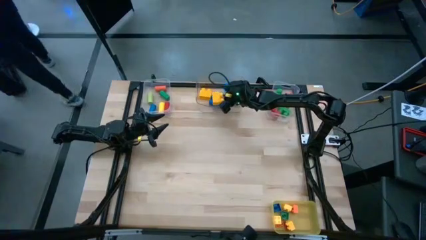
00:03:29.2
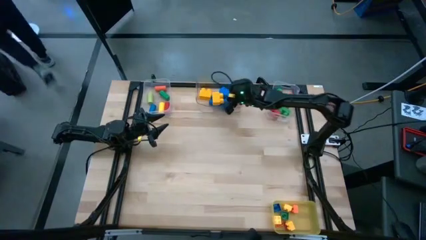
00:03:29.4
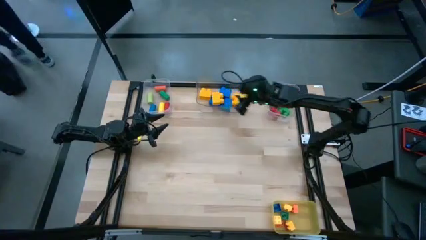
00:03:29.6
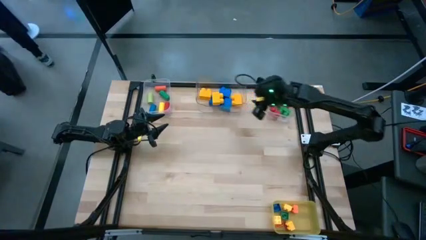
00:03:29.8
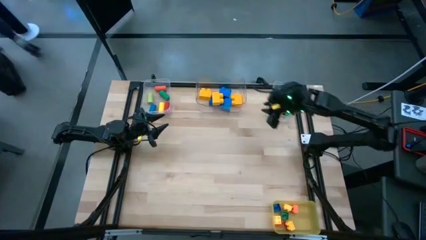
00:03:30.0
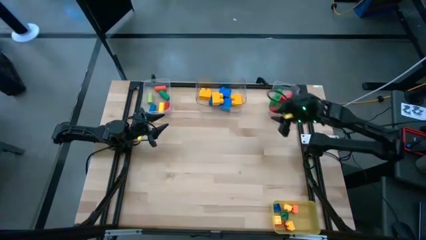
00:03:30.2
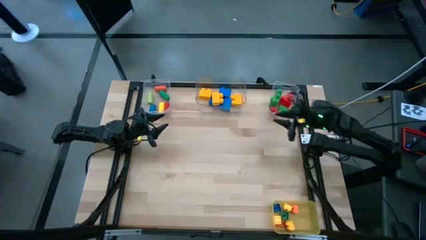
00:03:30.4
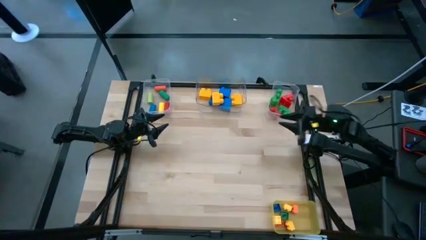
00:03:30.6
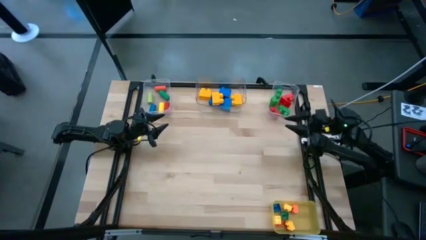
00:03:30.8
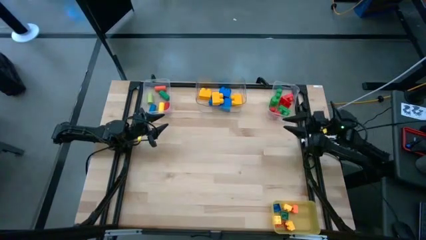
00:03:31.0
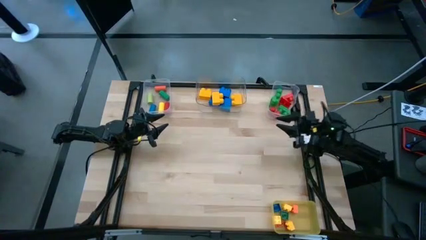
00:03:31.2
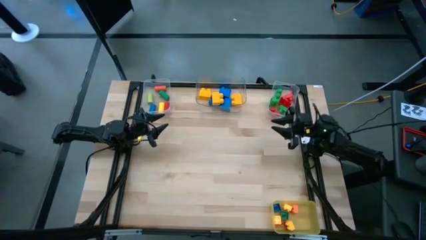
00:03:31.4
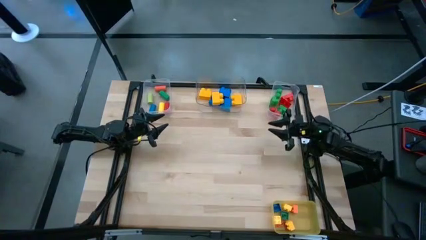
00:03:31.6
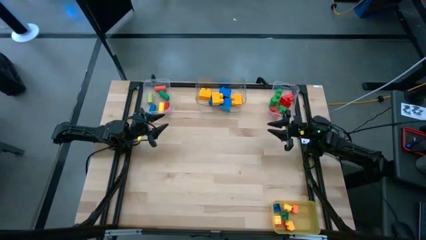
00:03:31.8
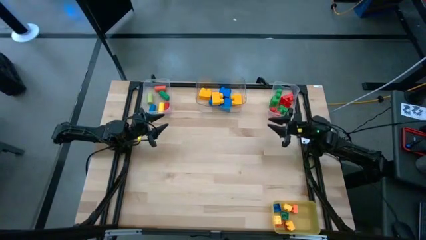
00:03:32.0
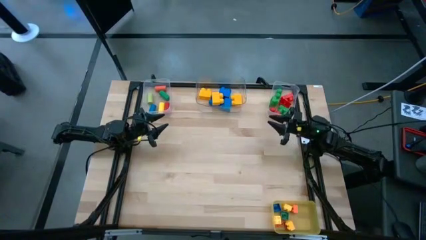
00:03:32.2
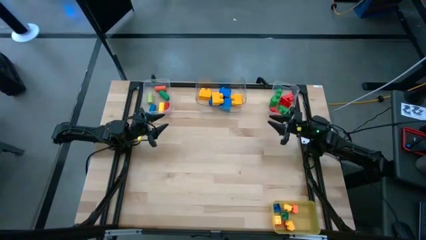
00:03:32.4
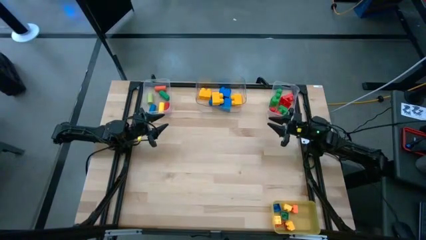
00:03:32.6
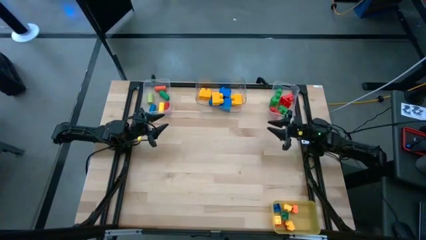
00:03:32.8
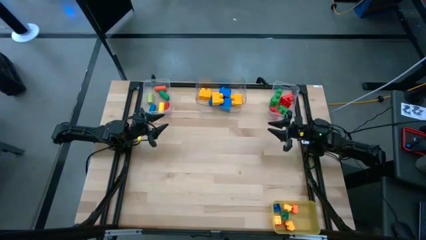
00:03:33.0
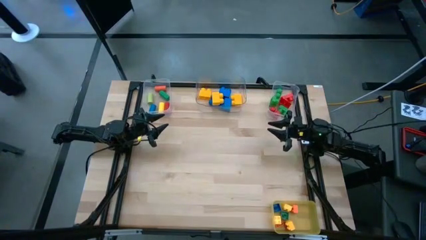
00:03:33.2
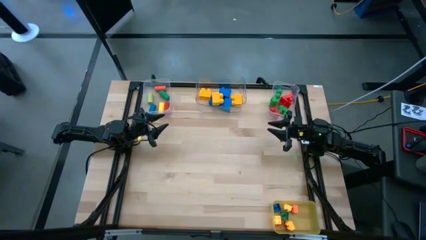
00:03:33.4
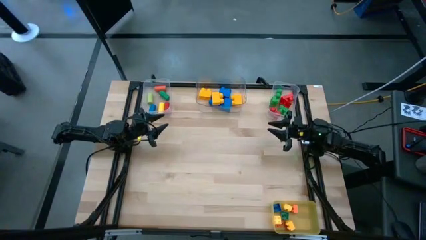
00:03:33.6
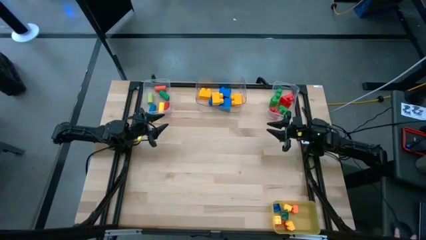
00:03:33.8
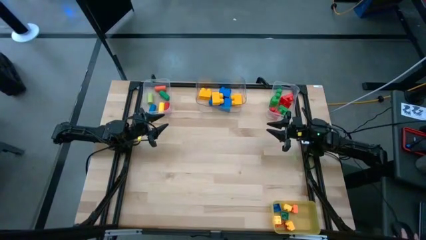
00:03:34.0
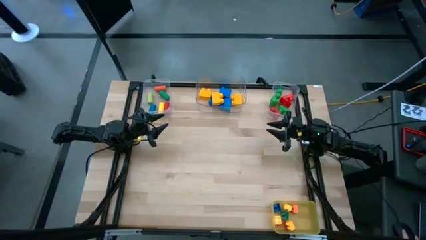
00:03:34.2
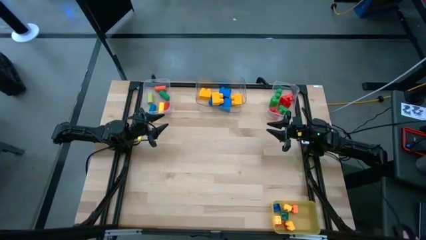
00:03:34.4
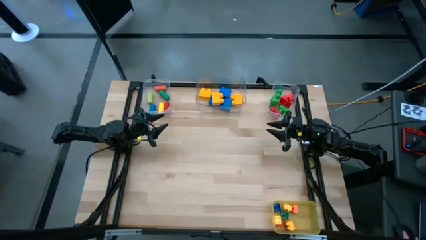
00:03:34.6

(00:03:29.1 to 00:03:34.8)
Task: Sort blocks by size
Return to Home Position

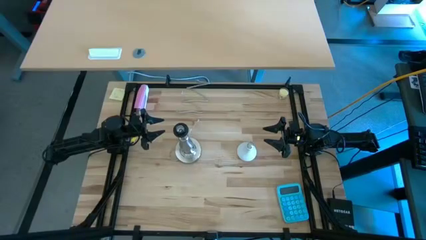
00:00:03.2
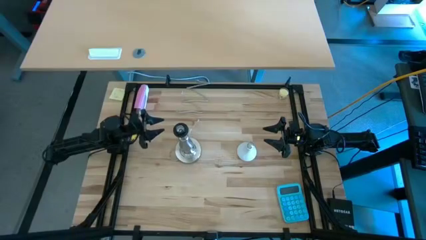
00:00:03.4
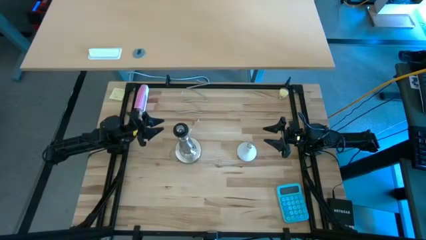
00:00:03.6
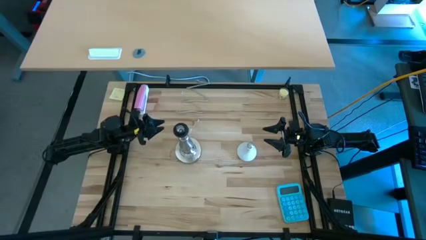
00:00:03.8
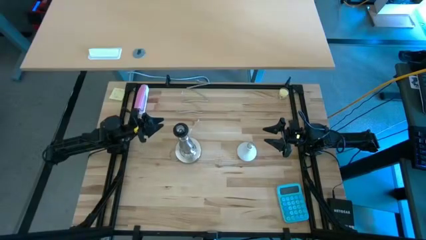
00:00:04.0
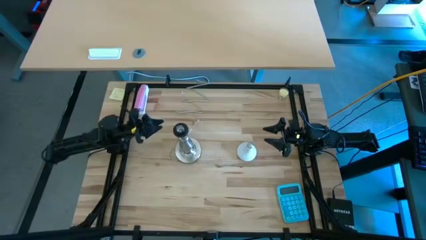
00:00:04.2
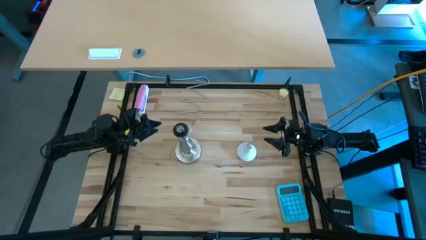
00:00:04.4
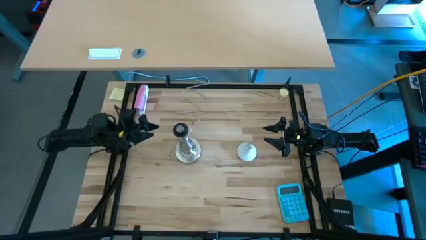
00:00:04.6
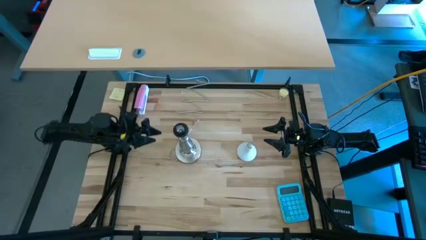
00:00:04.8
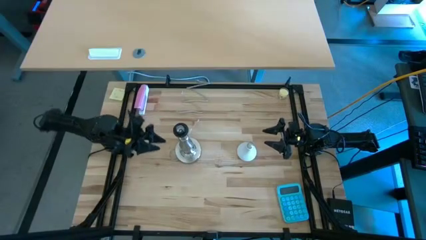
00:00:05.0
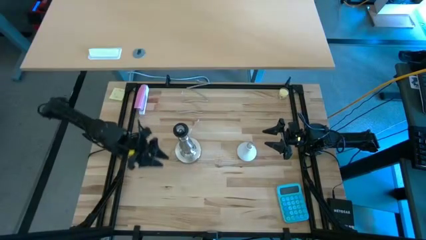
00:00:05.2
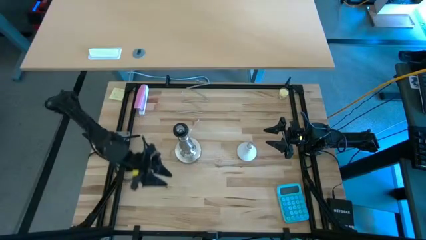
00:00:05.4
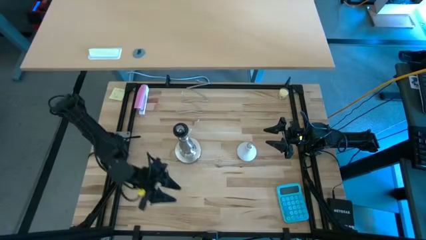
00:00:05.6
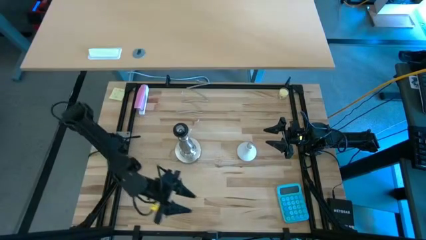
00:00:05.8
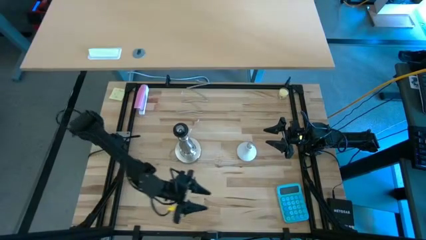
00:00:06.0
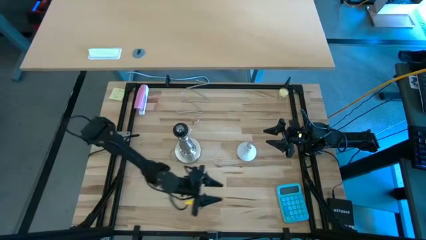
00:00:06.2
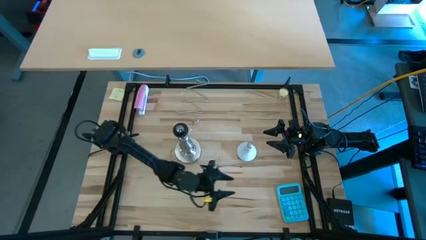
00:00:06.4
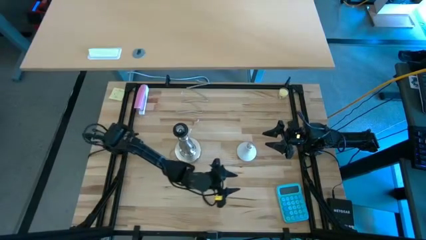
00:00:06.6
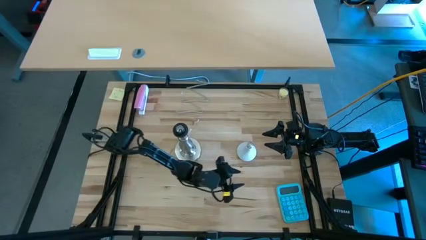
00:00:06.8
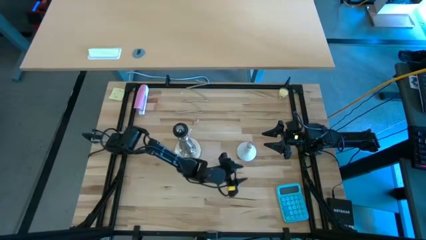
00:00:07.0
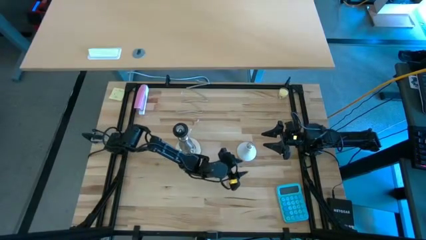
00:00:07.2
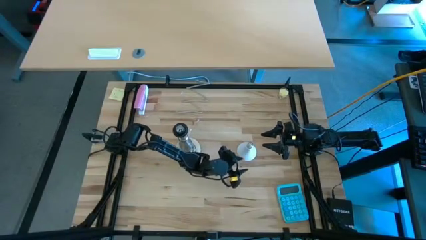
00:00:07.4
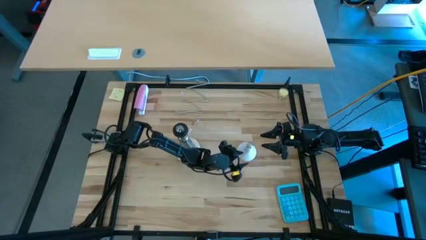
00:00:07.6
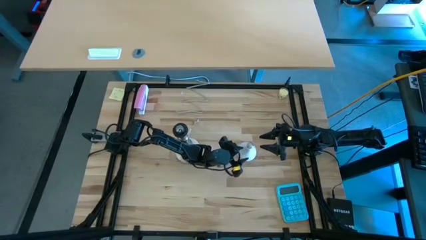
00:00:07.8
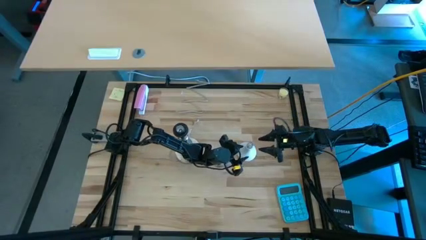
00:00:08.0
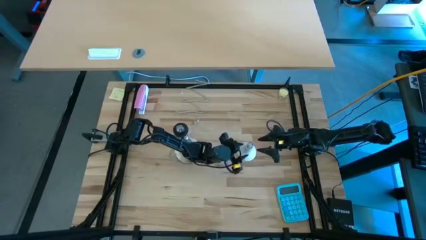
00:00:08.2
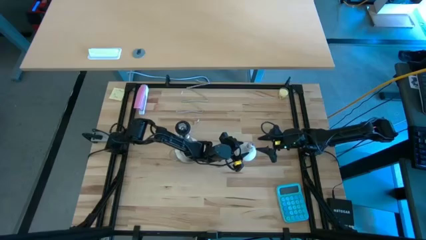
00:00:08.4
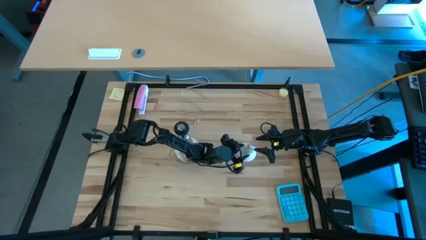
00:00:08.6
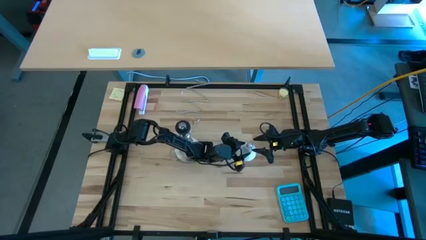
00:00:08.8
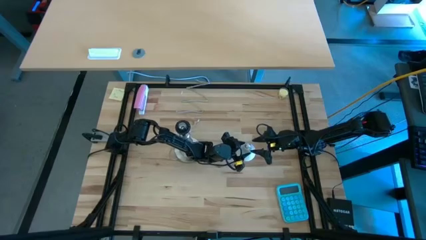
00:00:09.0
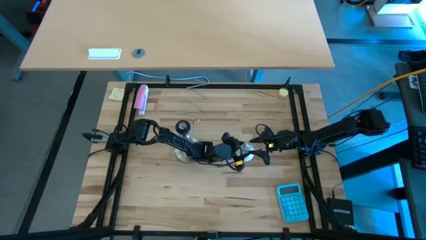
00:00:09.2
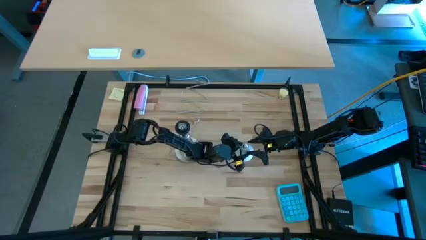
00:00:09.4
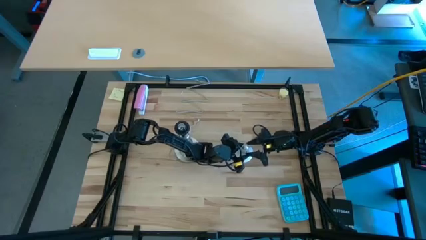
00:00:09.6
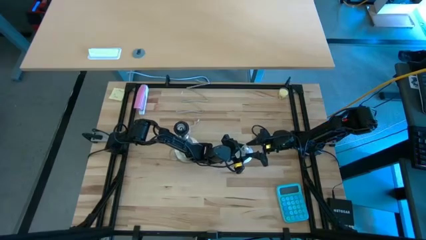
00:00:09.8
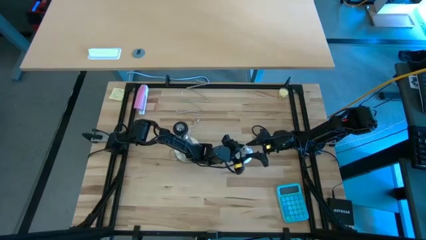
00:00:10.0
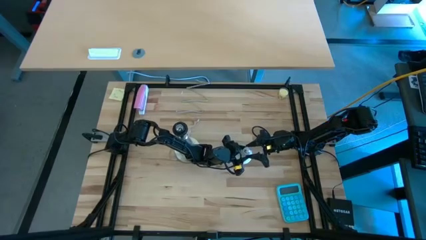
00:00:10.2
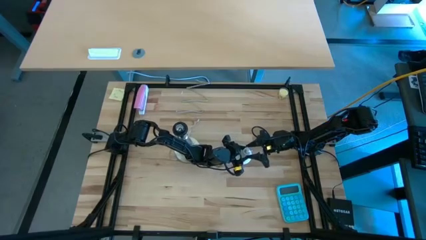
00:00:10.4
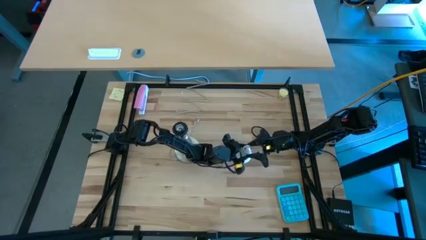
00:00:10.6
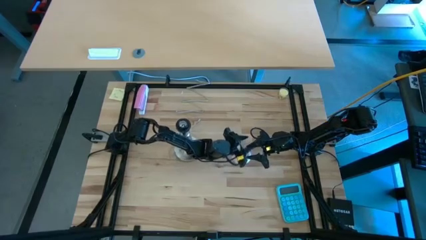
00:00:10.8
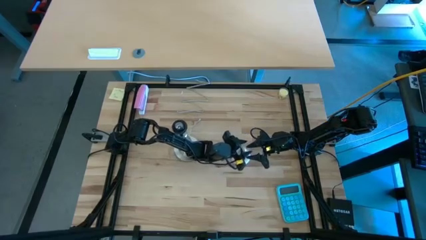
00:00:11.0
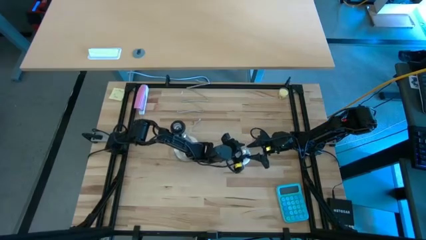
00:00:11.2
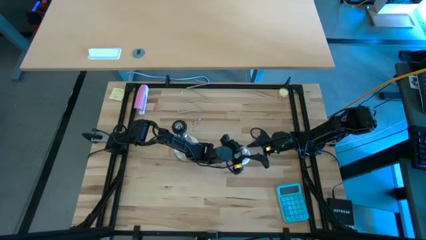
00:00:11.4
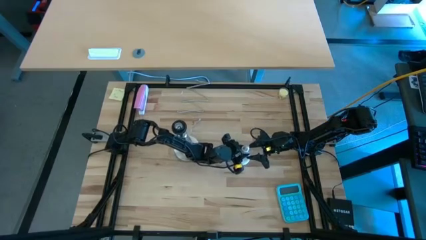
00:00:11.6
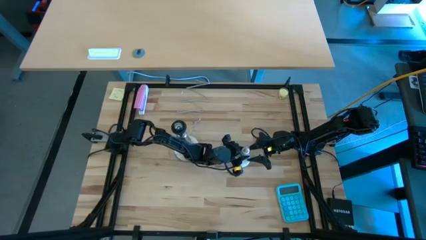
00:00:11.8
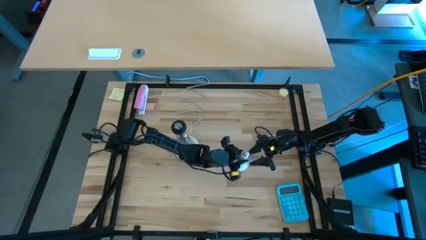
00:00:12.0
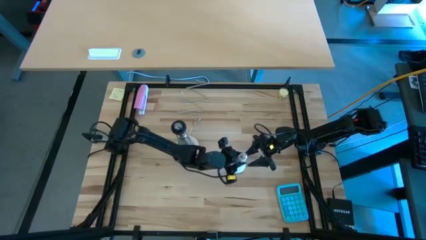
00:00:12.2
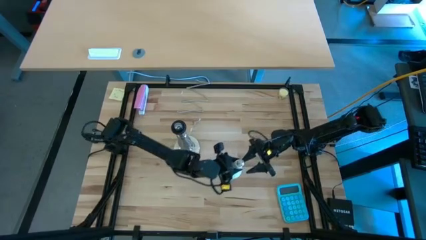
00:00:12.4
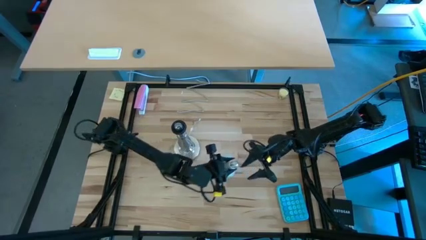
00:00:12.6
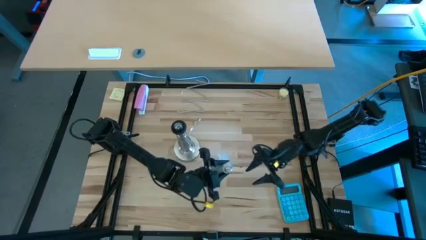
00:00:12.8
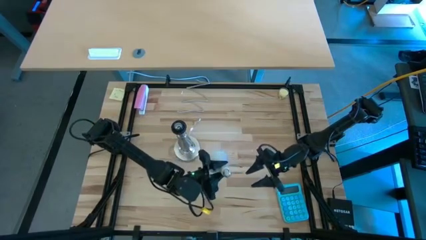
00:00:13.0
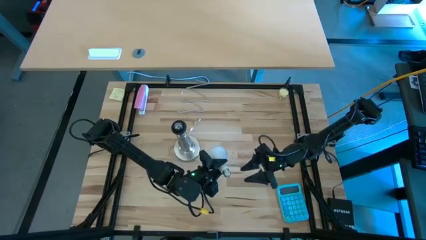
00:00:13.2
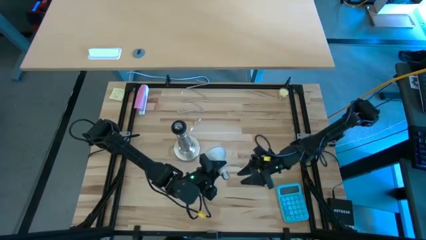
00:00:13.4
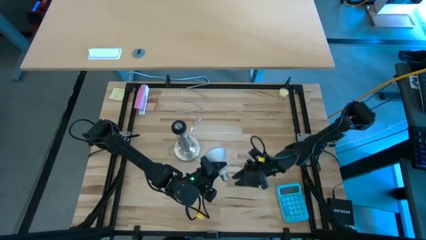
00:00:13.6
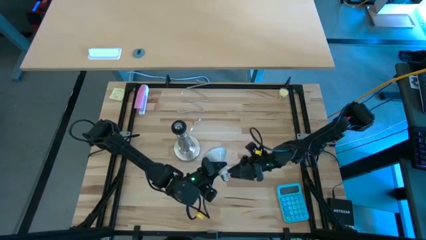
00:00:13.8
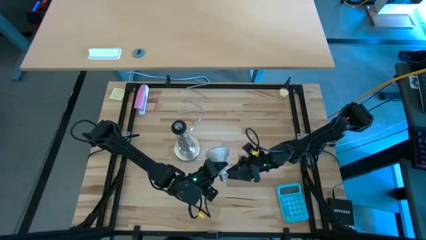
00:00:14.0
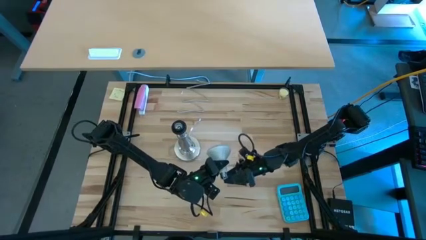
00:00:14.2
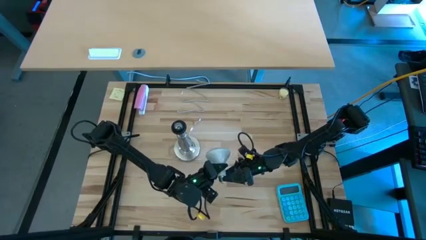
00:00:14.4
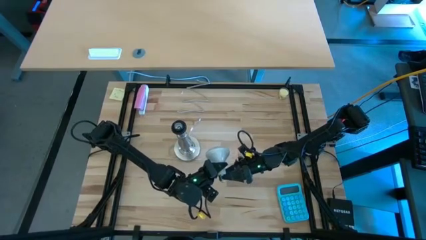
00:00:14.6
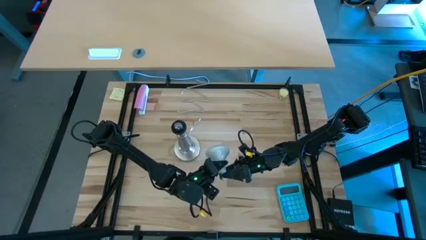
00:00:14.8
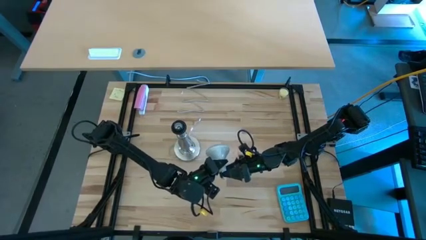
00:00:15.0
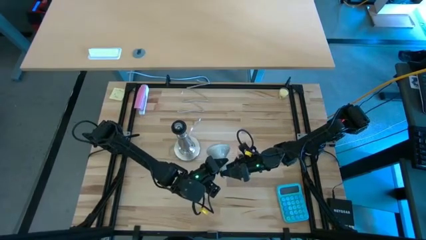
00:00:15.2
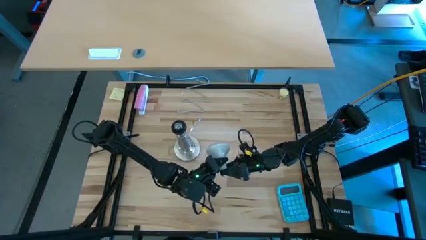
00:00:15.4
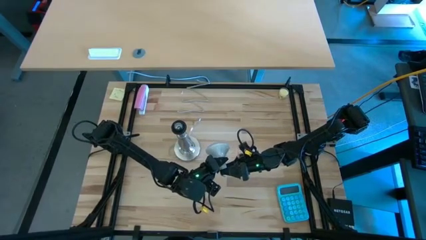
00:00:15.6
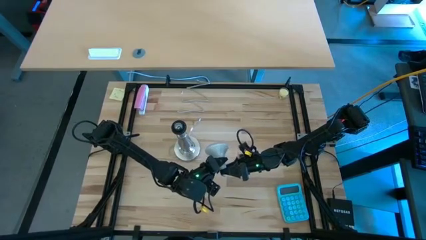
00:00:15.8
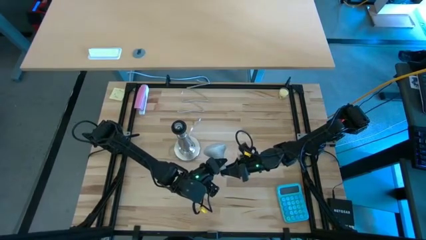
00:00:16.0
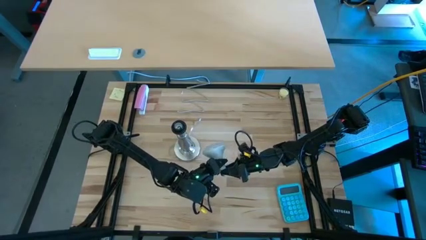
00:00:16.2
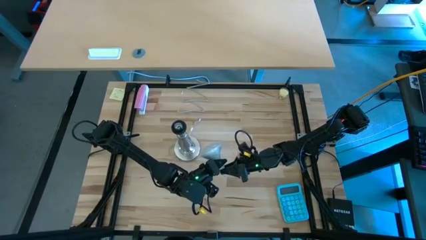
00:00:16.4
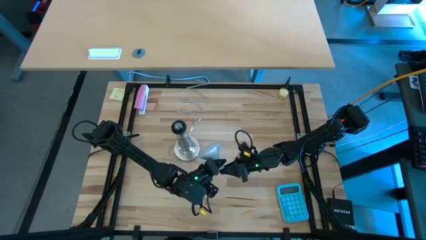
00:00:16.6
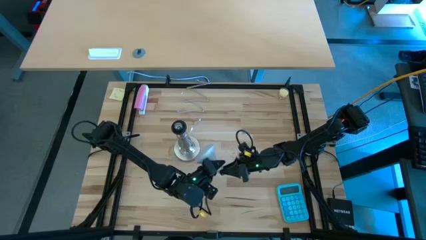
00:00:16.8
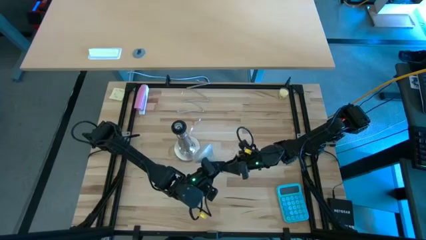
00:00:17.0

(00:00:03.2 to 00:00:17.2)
Task: Screw lightbulb
Insert the lightbulb into the desk lamp
